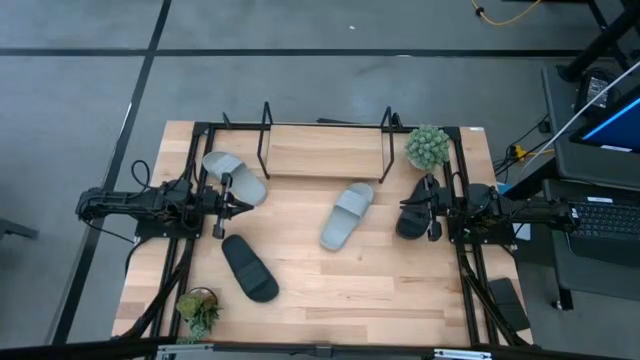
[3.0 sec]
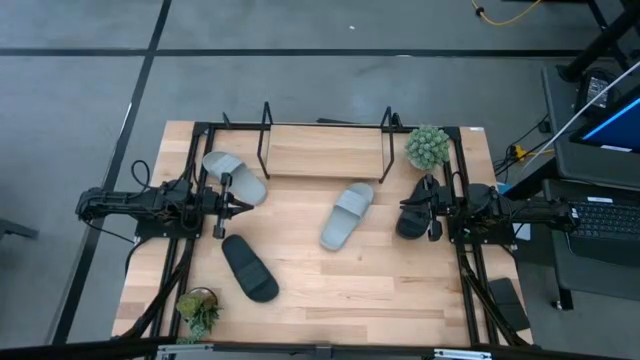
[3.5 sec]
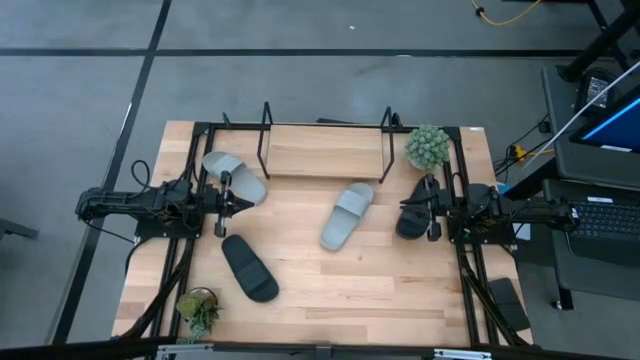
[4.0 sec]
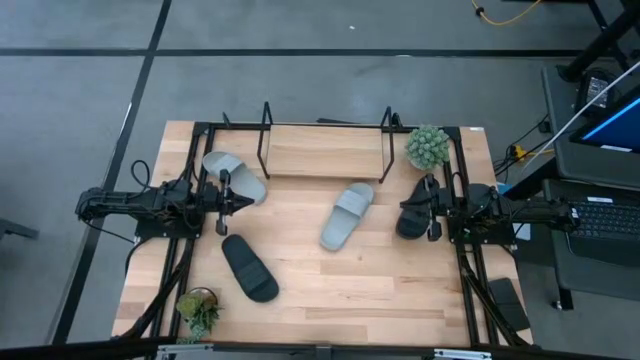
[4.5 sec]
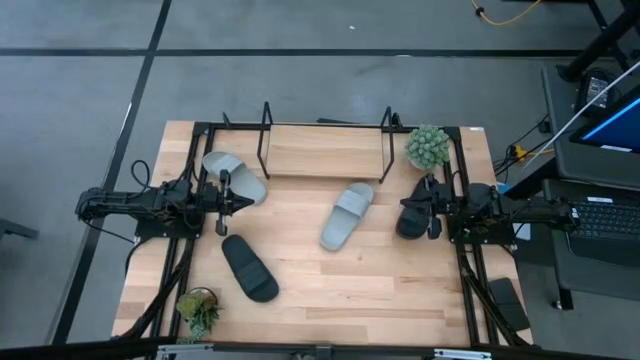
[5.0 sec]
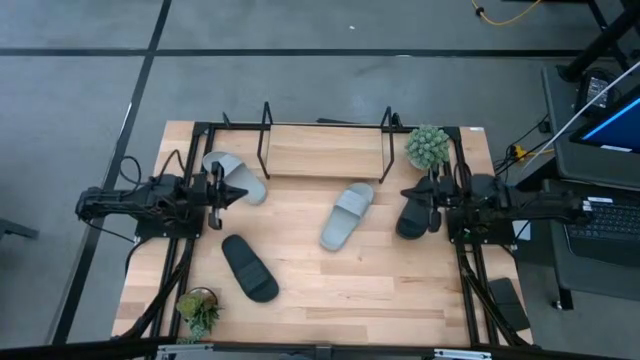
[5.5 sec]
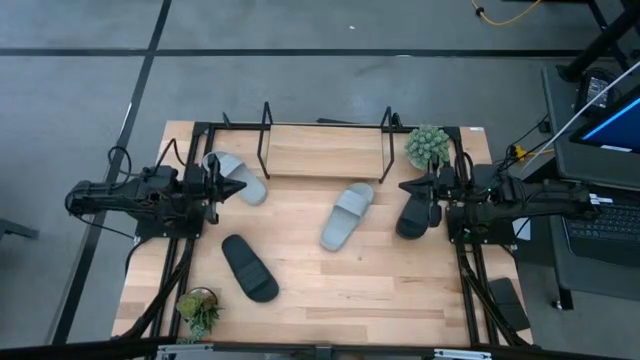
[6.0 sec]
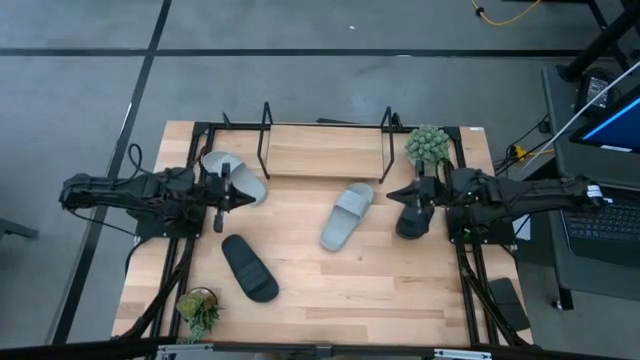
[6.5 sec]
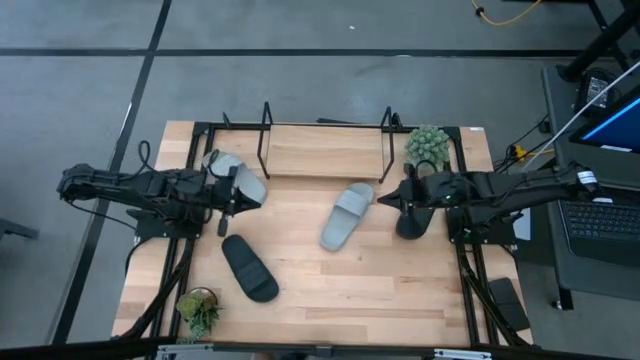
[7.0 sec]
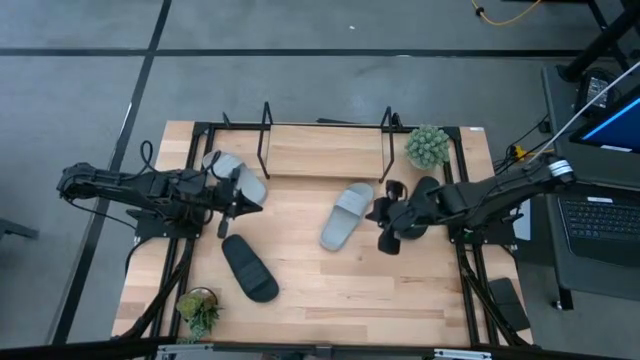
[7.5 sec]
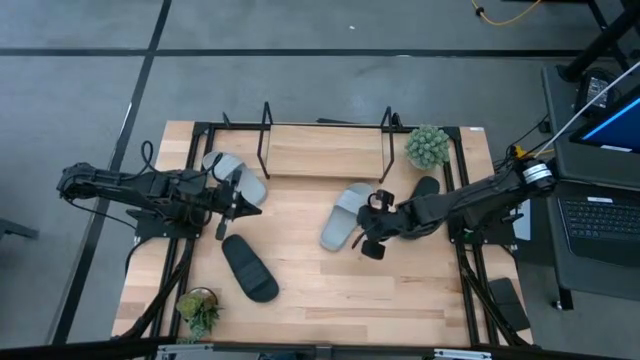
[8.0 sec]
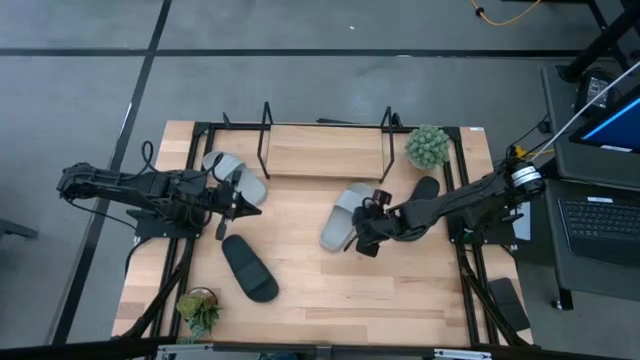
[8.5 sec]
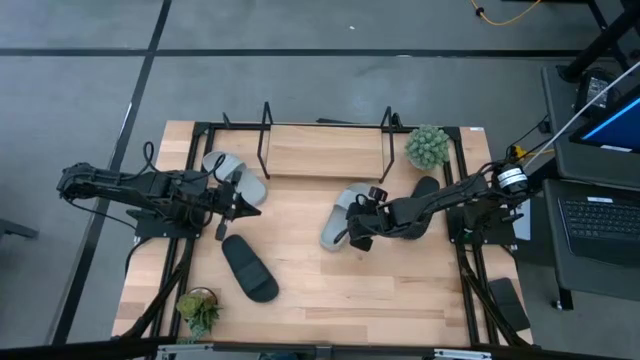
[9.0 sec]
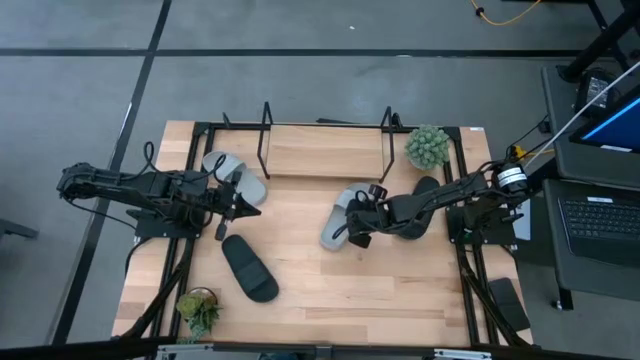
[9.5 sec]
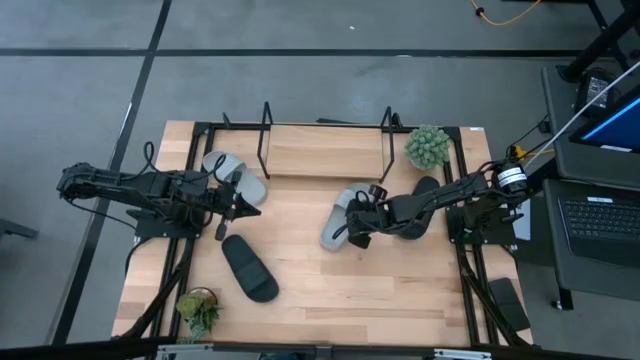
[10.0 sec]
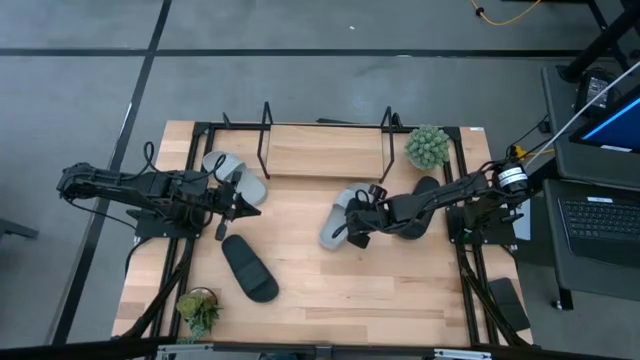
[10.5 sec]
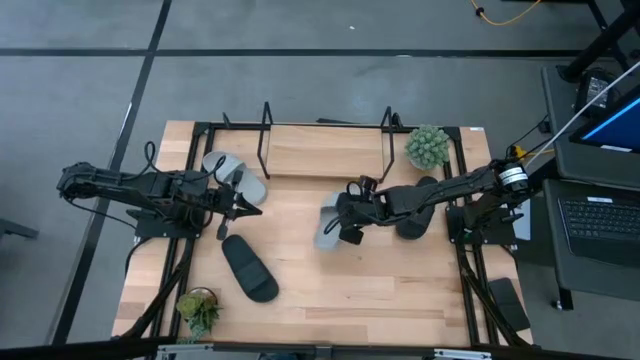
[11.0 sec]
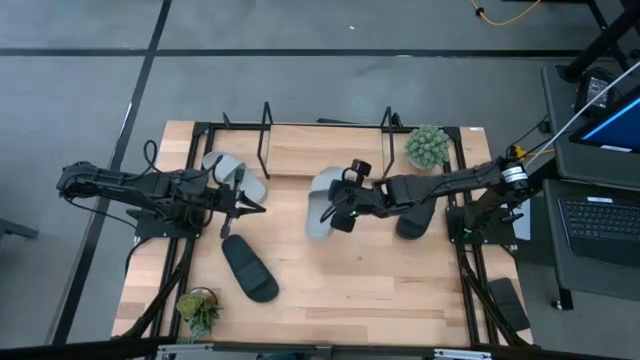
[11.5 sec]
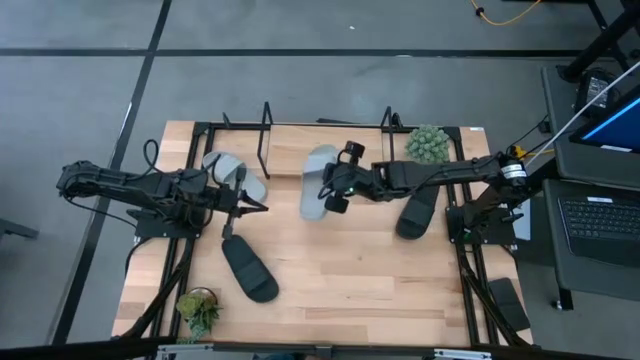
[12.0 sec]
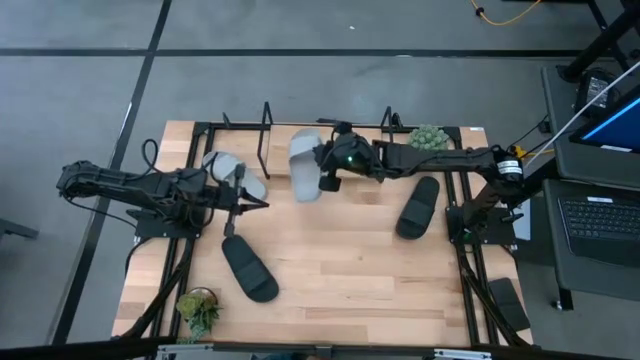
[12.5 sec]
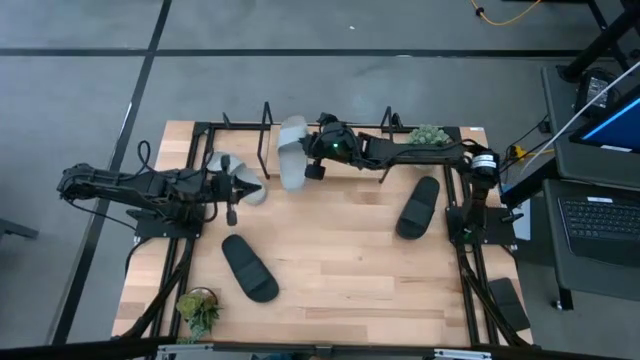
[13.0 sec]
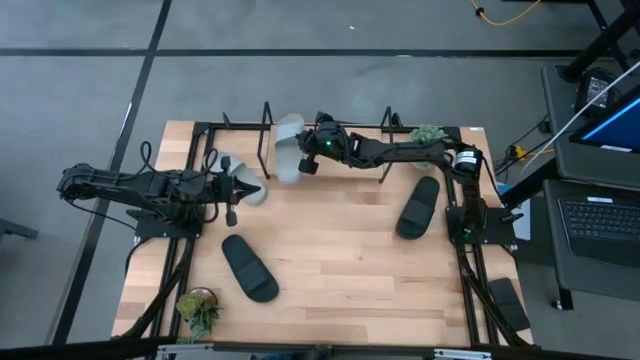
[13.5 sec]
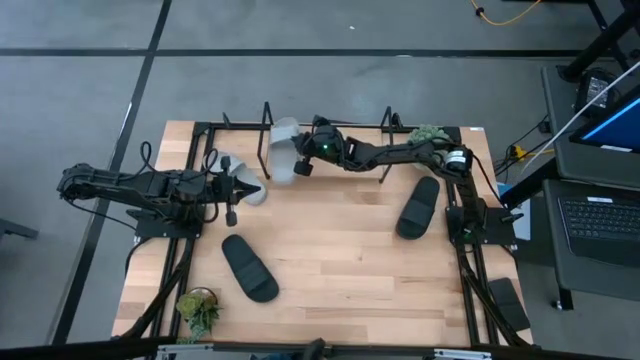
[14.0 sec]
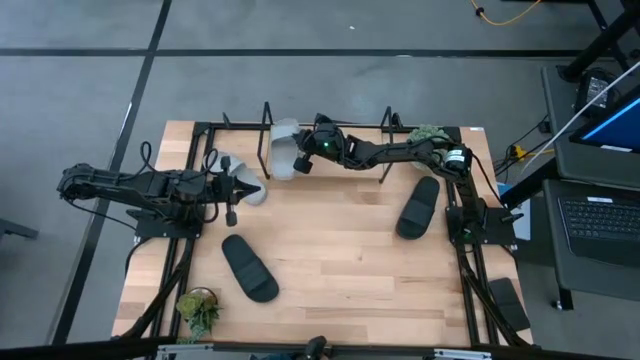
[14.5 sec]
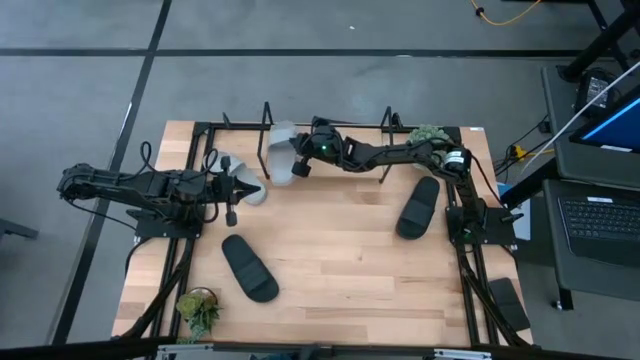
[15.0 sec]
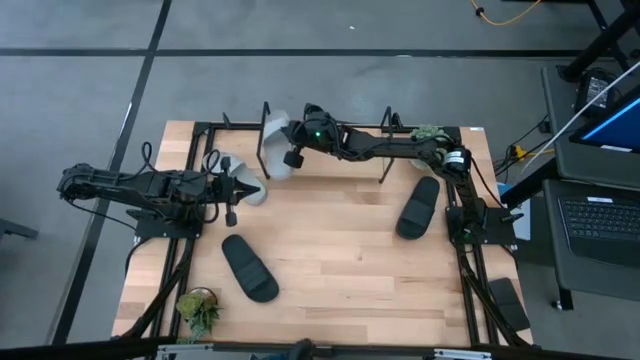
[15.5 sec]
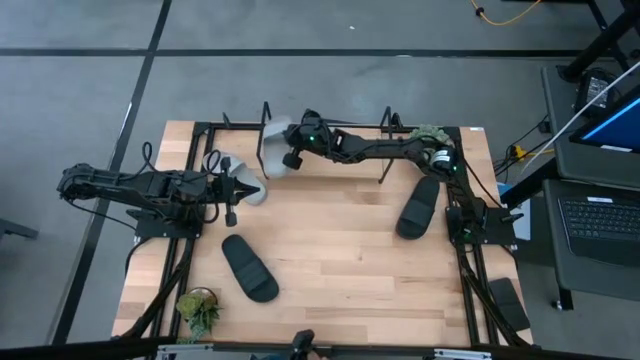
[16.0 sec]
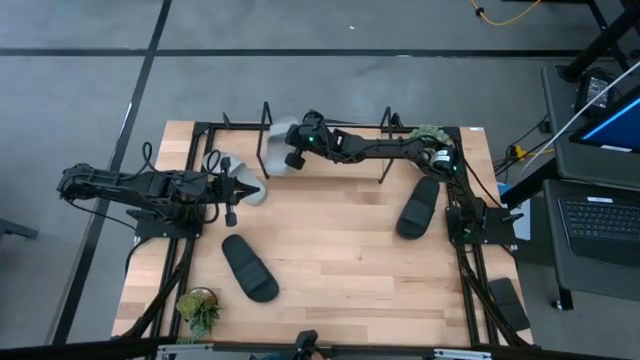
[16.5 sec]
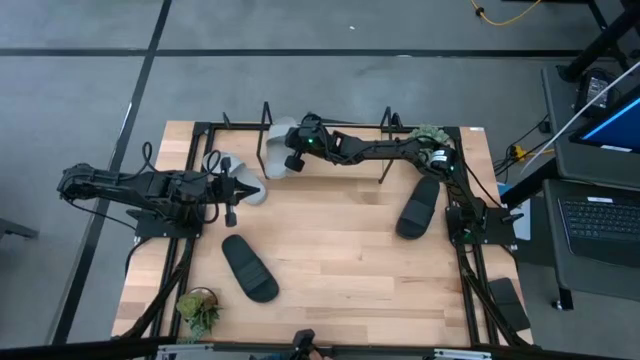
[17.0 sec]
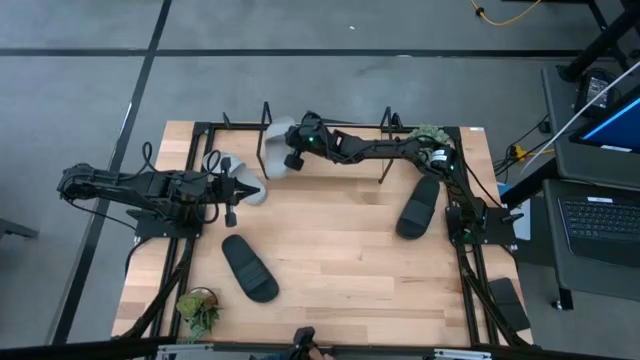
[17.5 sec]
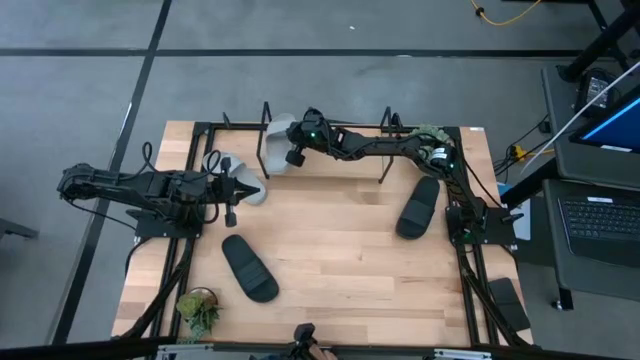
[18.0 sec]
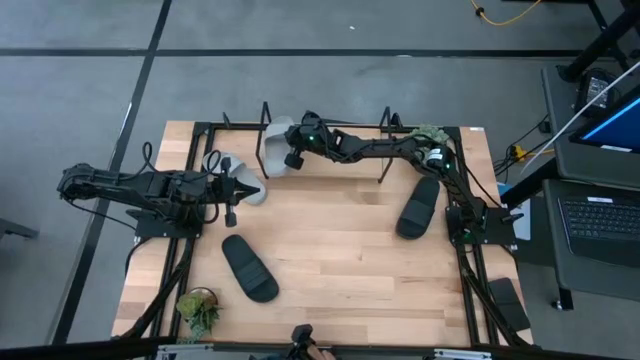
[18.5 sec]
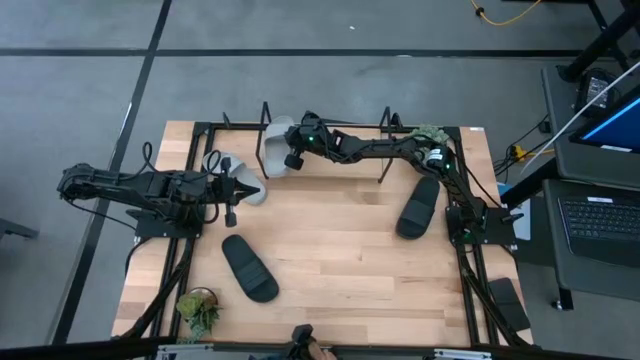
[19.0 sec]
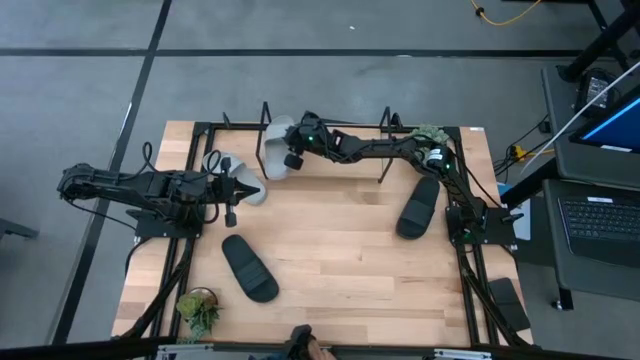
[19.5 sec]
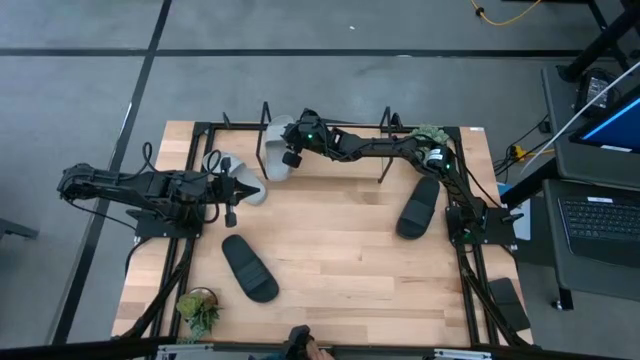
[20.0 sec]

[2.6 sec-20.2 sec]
Task: Pick and place slides into the shelf
Put the right gray slide on the shelf

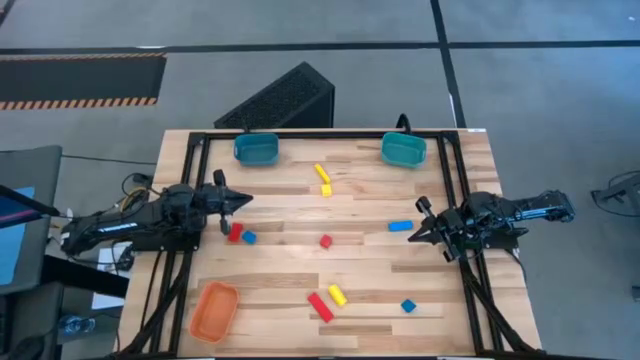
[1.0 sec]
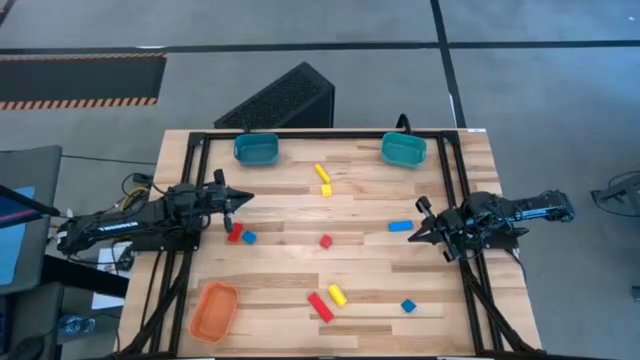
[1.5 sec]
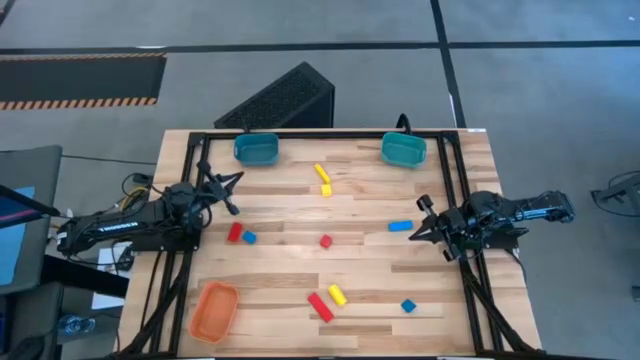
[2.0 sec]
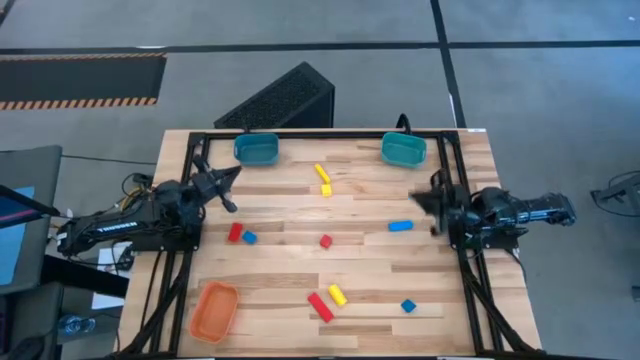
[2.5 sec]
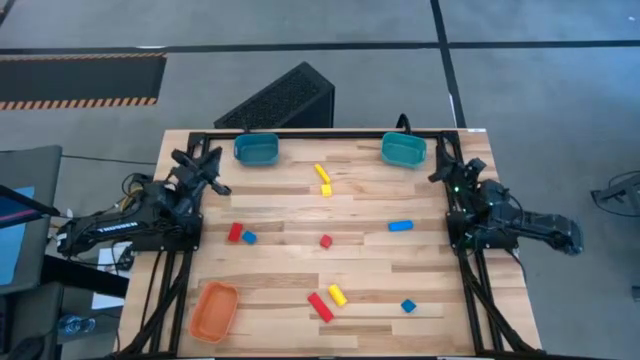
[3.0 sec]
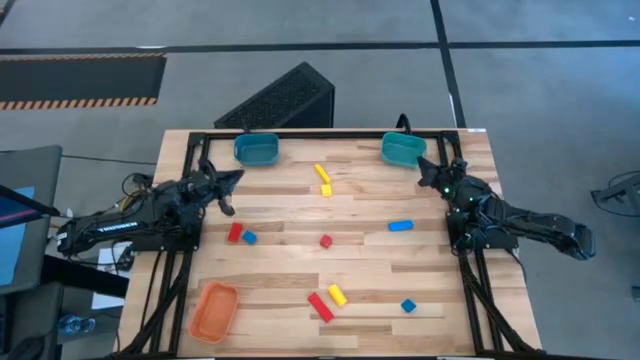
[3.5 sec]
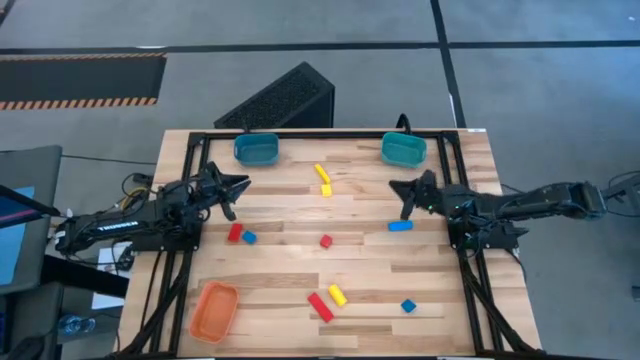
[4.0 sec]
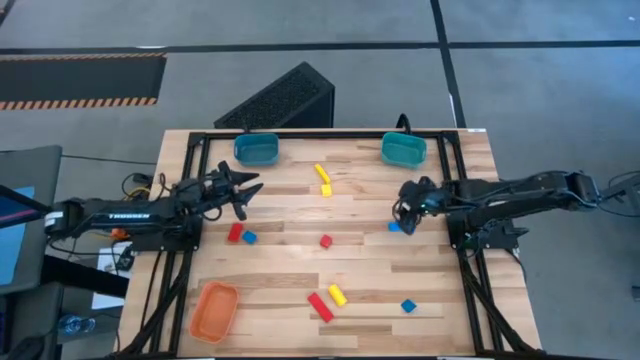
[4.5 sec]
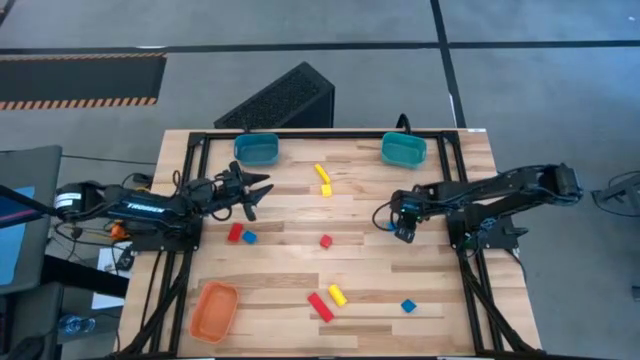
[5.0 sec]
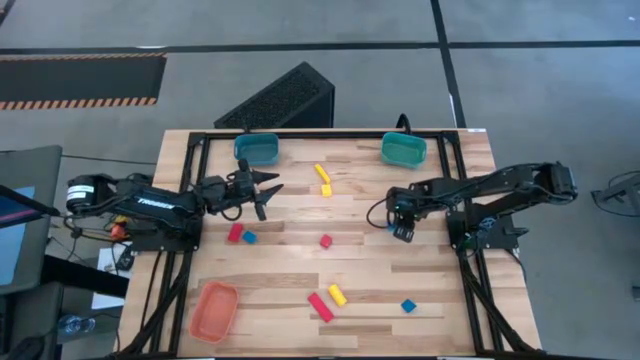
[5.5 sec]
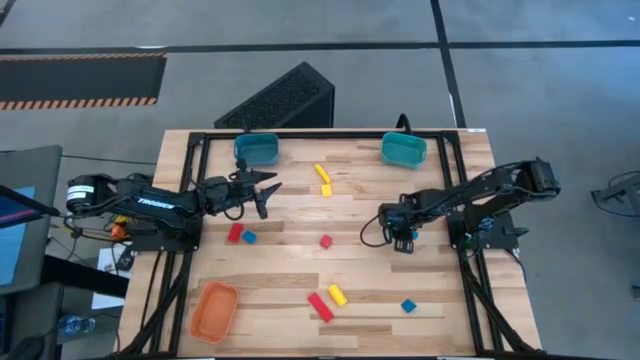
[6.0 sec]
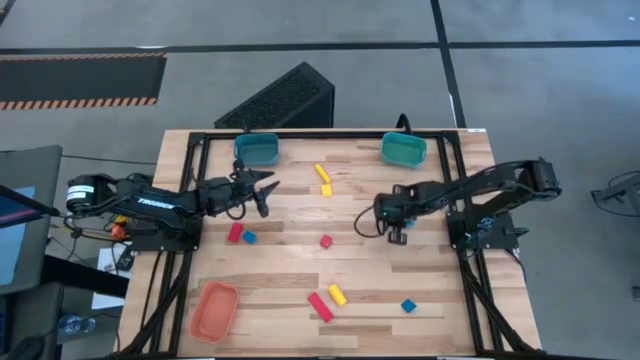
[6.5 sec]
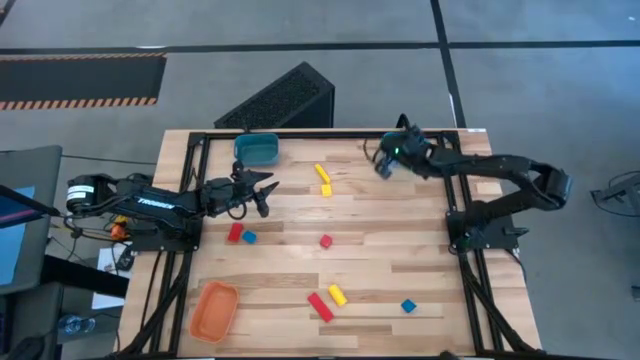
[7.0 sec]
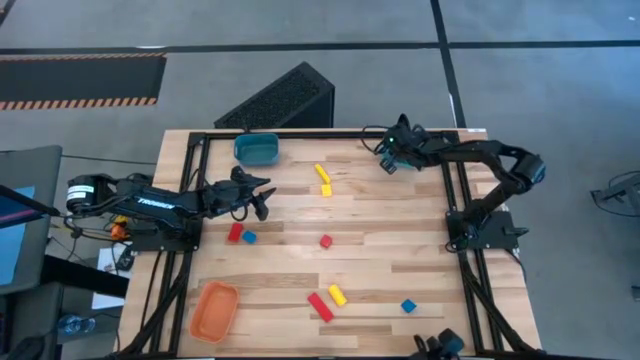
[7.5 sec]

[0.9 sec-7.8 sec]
Task: Sort & place blocks by color
Put the top right blue block into the green bin
